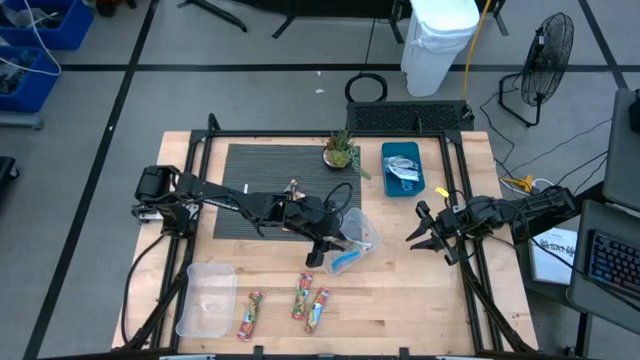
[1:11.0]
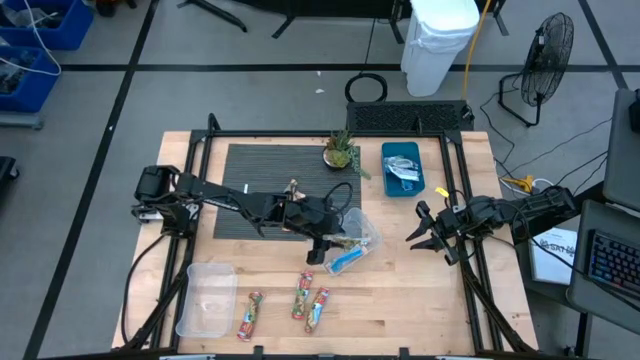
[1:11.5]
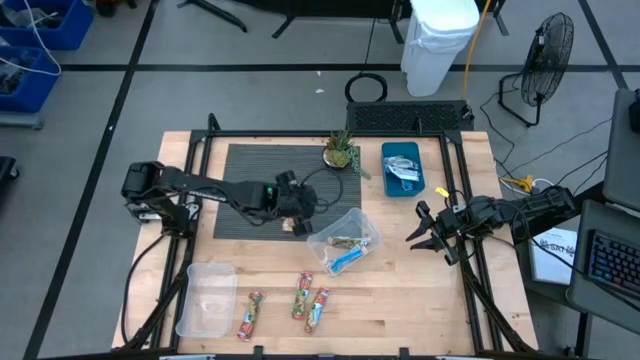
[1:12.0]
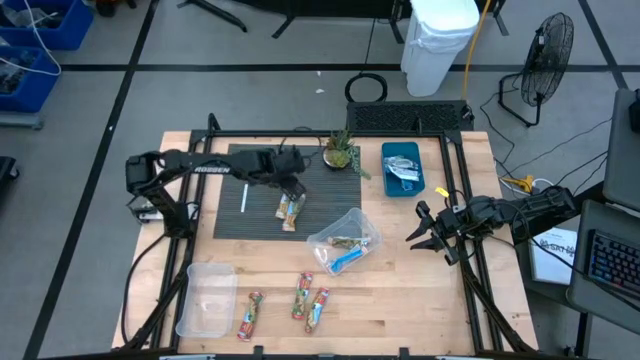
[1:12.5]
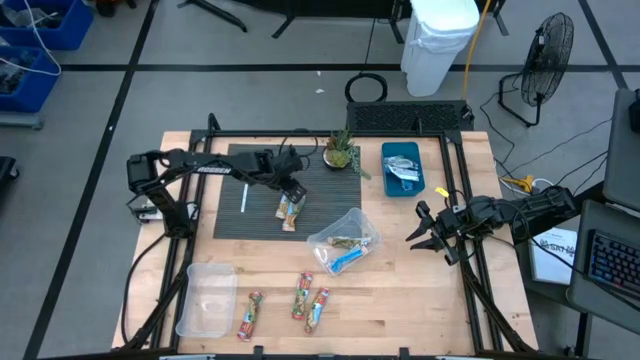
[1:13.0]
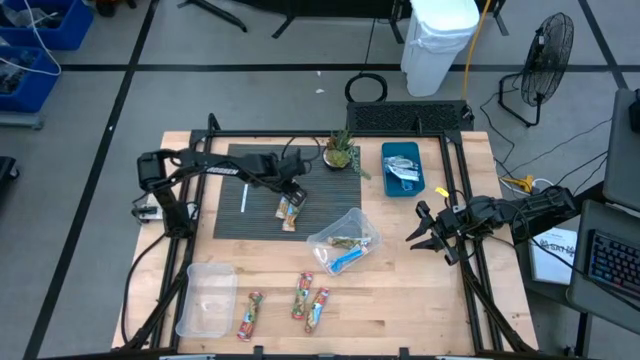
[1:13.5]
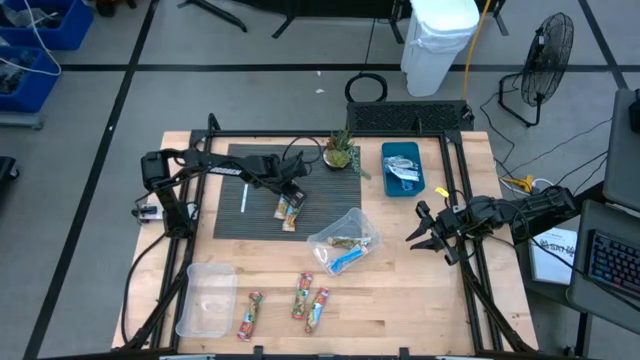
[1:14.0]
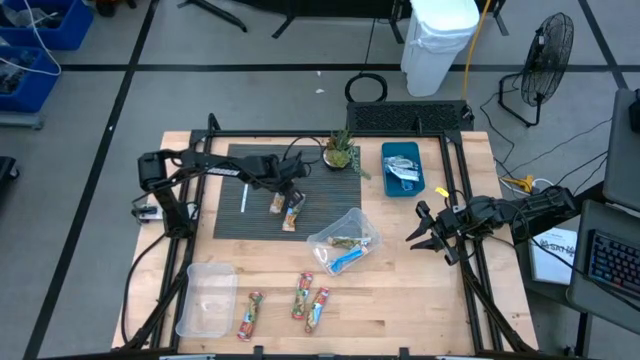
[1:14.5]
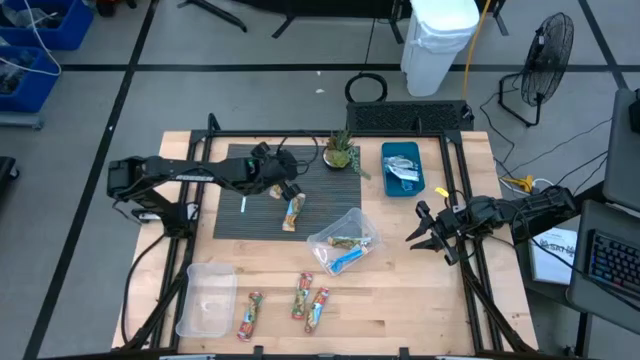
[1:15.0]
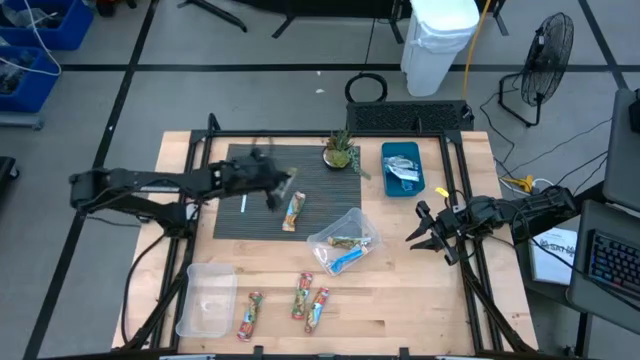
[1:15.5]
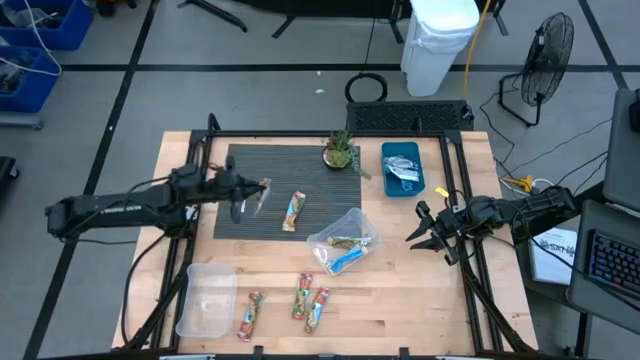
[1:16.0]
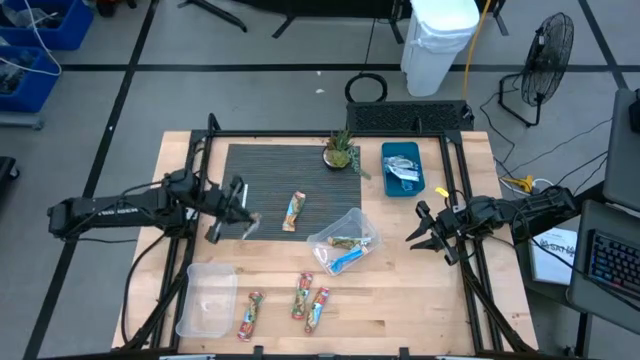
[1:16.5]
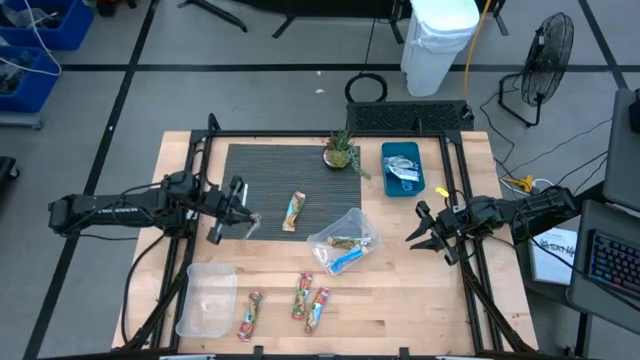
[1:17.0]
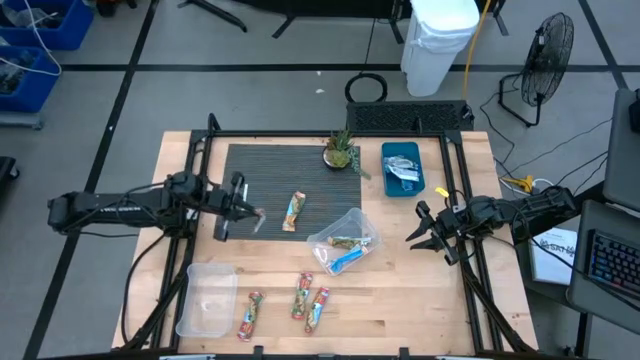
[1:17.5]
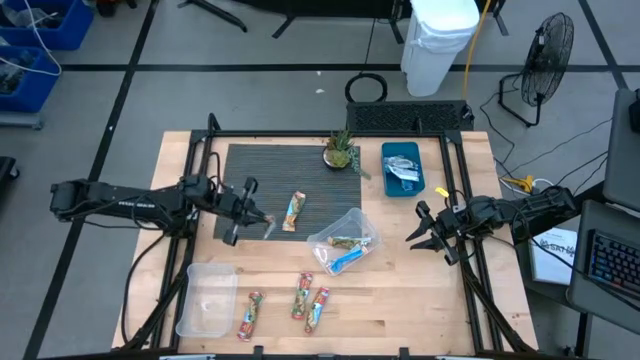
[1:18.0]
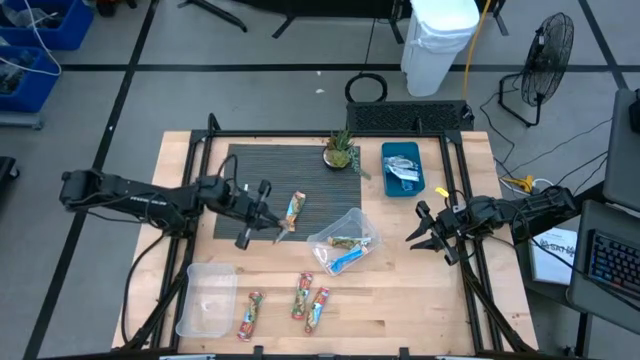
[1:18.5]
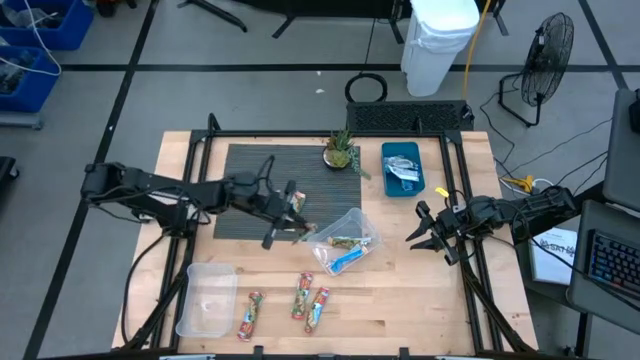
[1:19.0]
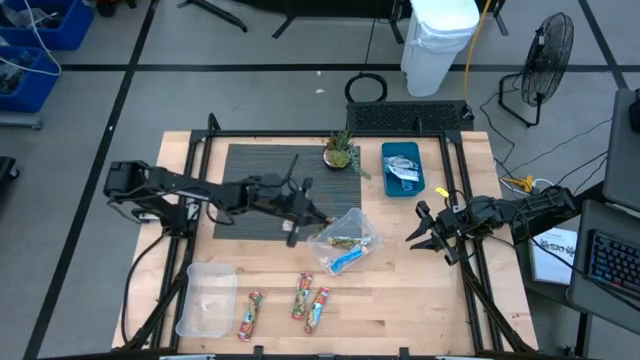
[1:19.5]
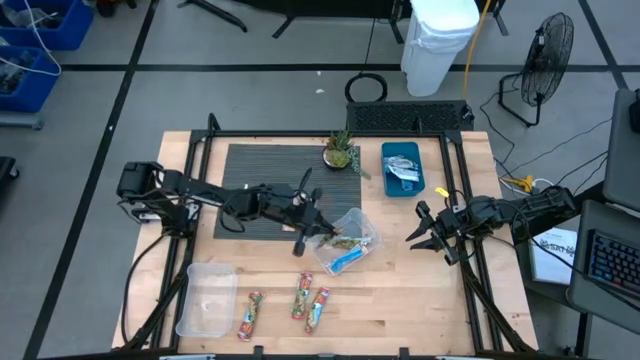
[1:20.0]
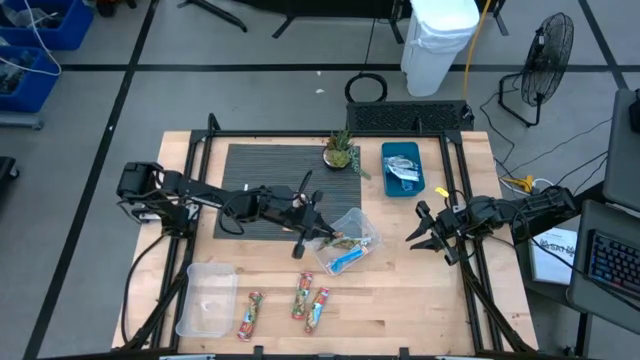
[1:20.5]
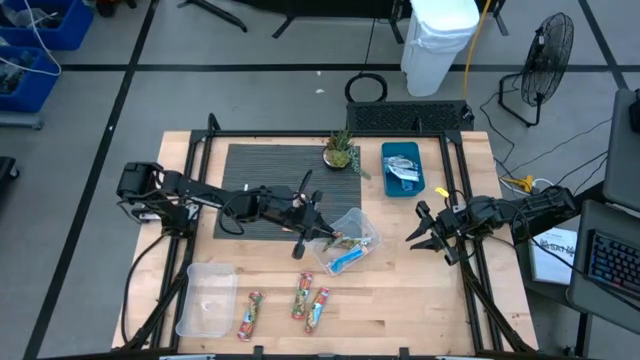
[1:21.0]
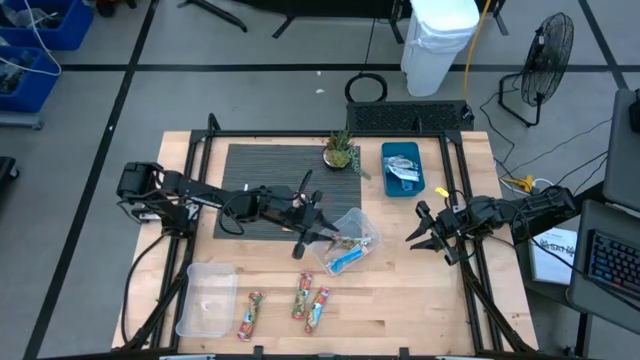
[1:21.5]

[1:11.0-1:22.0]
Task: Pick and place Granola Bars by type
Put the left yellow granola bar into the top transparent bin

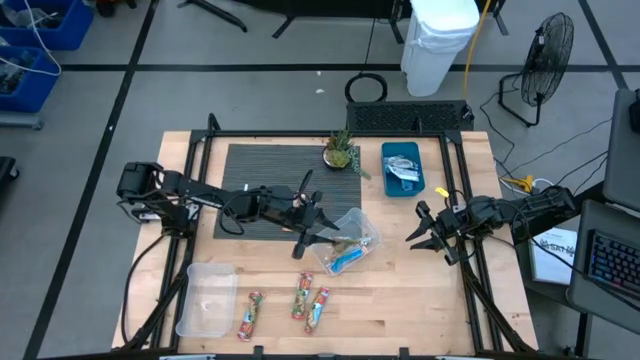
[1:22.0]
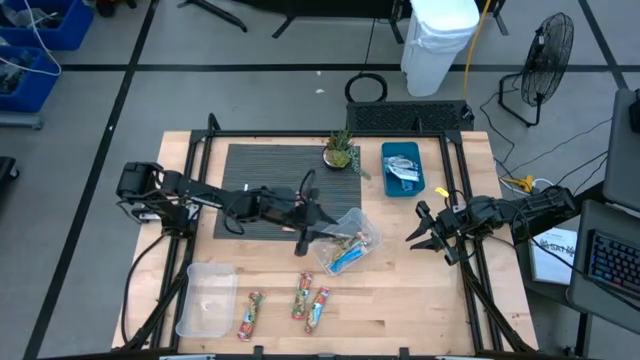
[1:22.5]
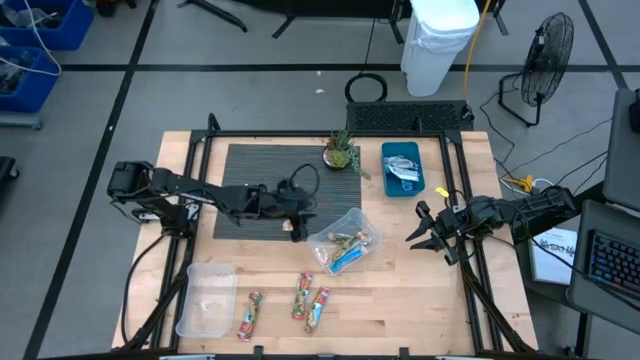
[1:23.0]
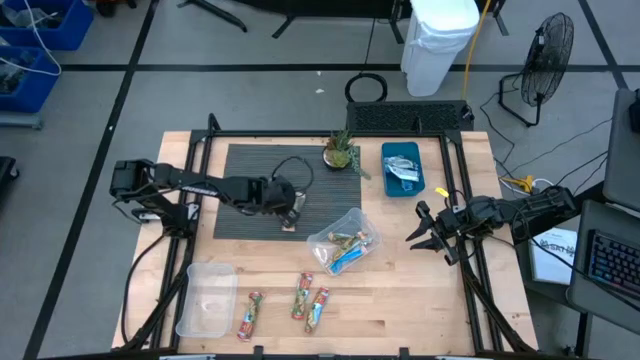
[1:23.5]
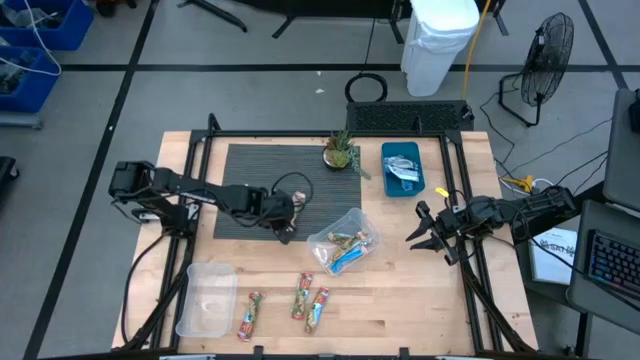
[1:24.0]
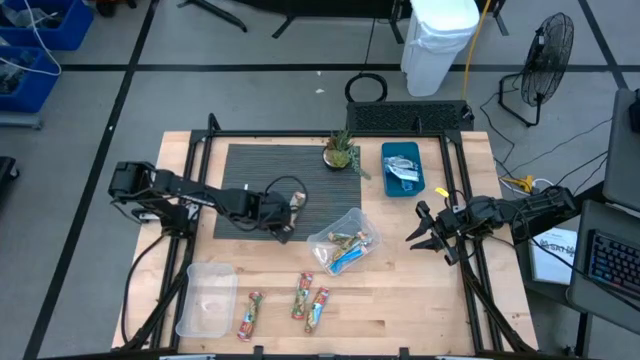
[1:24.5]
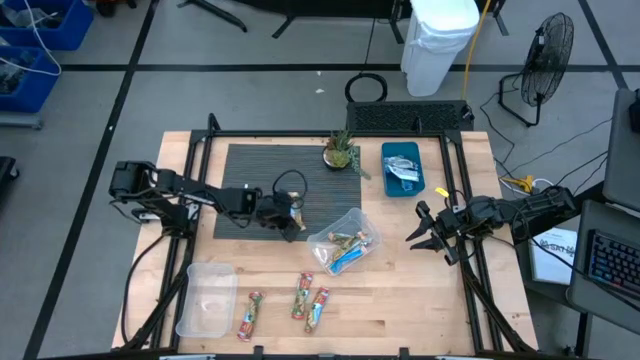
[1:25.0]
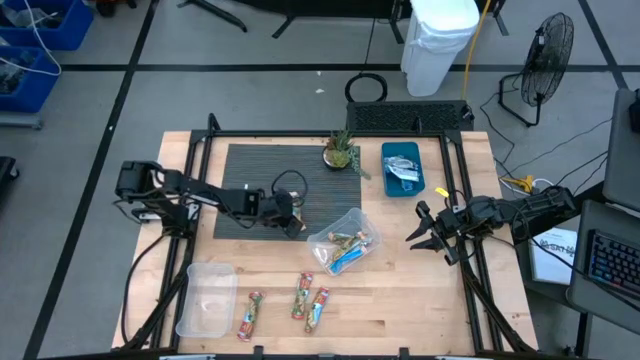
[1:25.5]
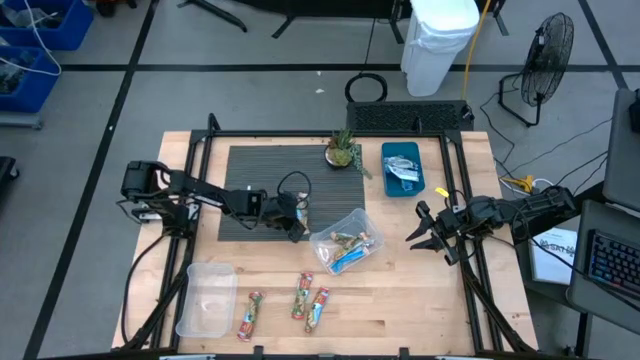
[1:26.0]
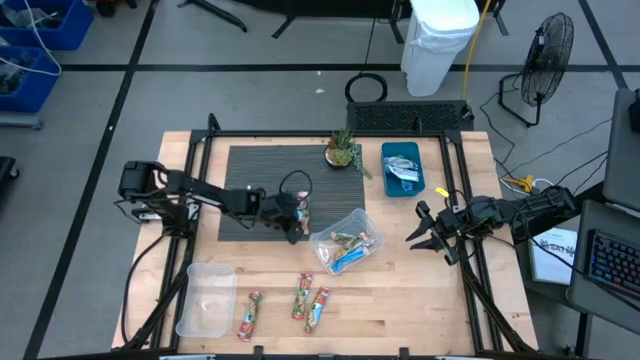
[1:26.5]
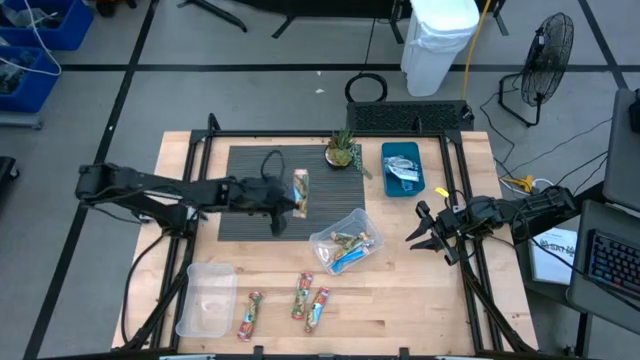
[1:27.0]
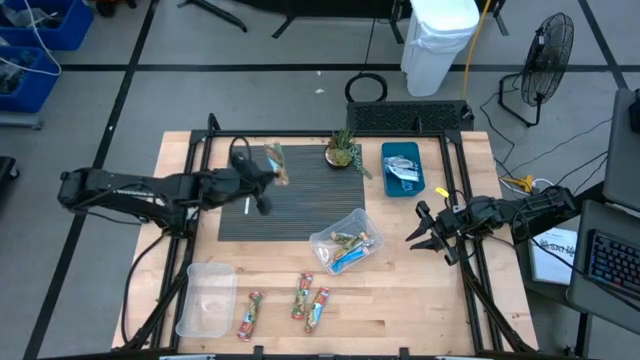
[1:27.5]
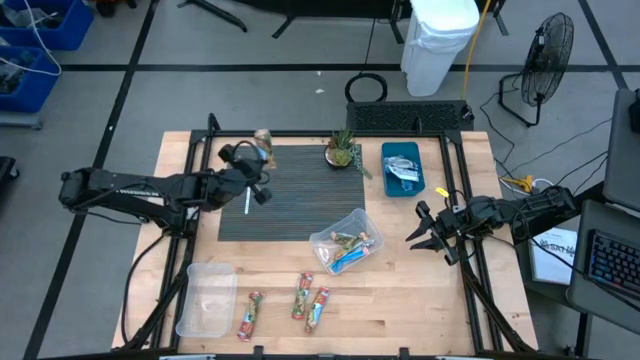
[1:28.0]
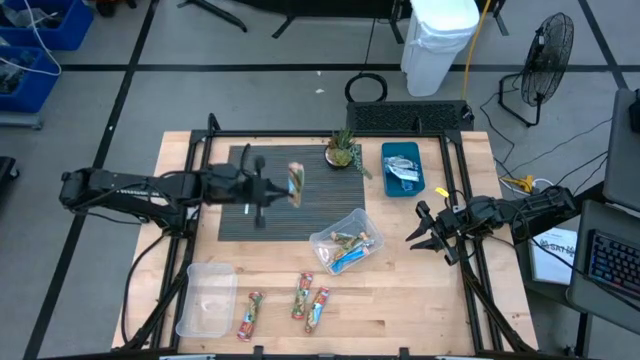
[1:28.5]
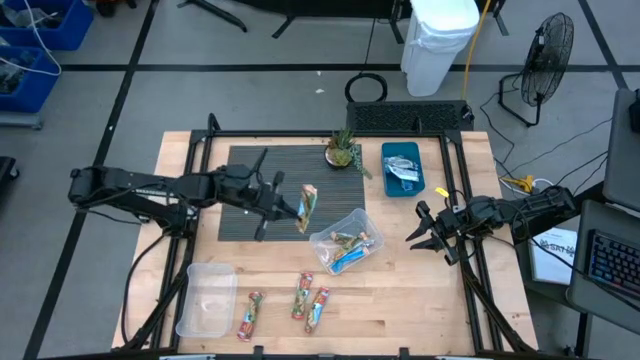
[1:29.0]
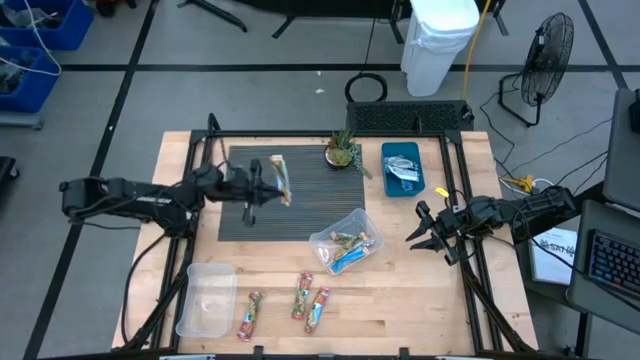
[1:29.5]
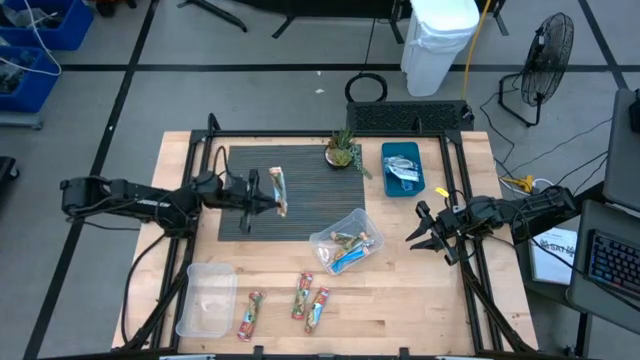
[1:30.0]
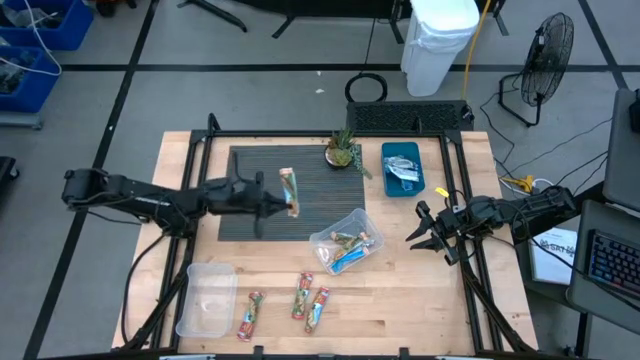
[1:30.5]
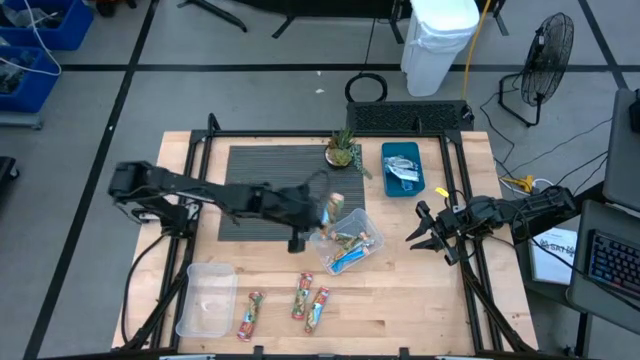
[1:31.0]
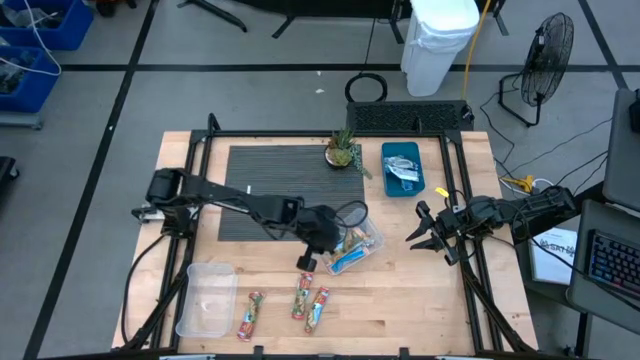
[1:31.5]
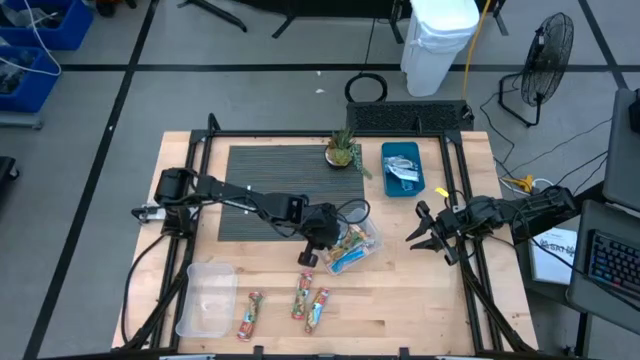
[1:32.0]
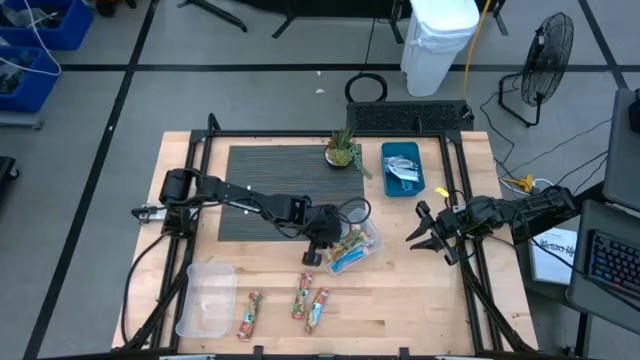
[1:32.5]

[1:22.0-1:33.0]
Put the yellow granola bar into the top transparent bin
